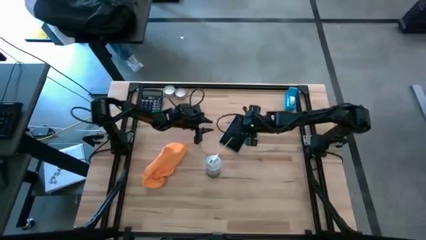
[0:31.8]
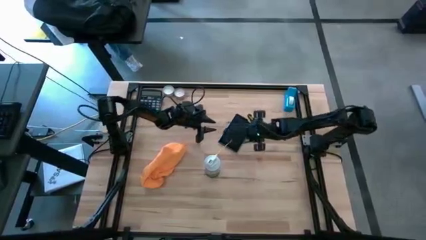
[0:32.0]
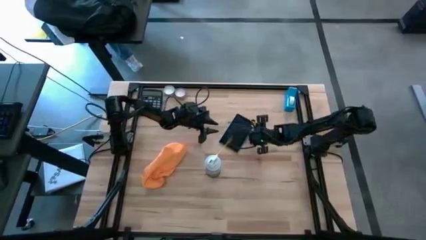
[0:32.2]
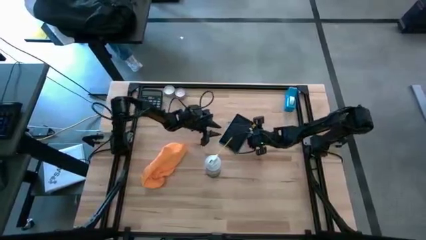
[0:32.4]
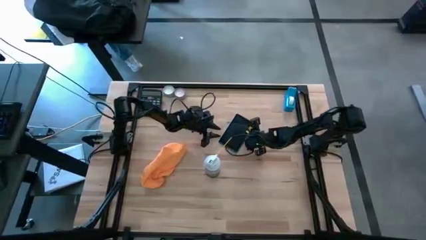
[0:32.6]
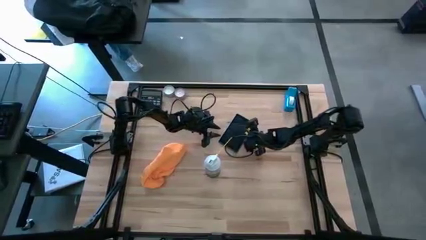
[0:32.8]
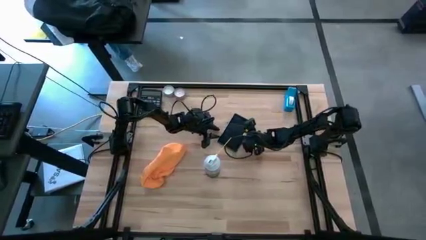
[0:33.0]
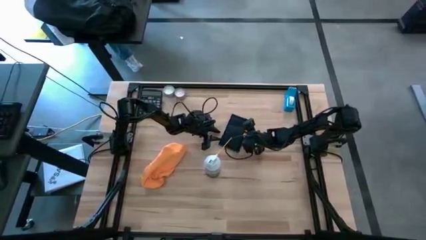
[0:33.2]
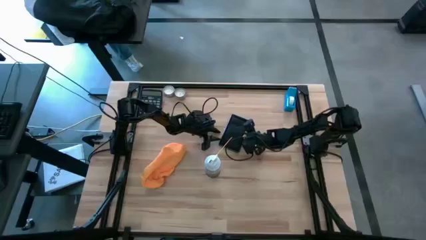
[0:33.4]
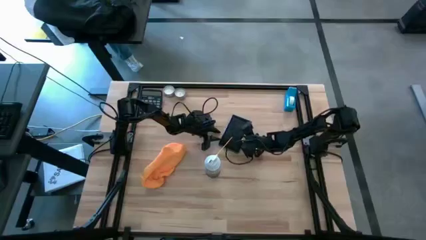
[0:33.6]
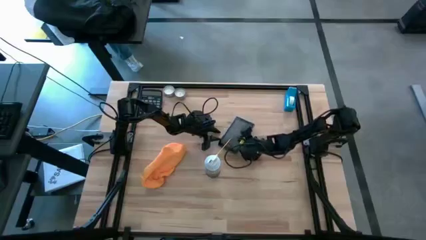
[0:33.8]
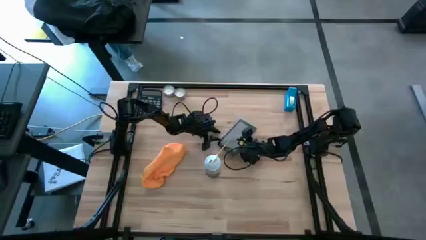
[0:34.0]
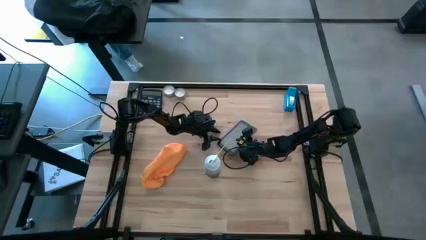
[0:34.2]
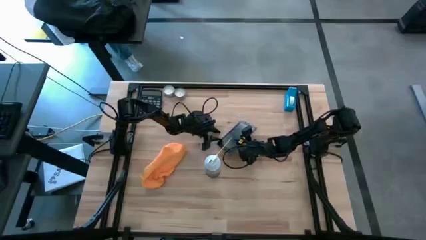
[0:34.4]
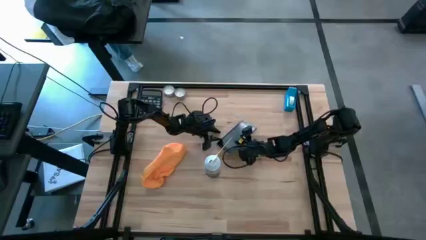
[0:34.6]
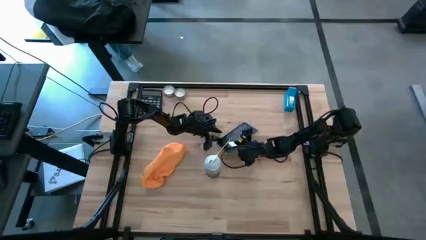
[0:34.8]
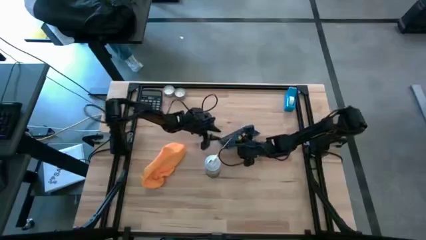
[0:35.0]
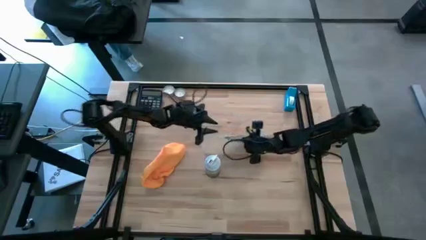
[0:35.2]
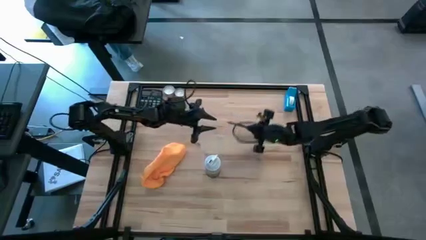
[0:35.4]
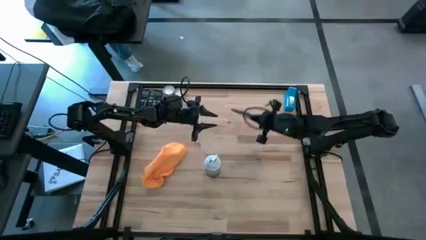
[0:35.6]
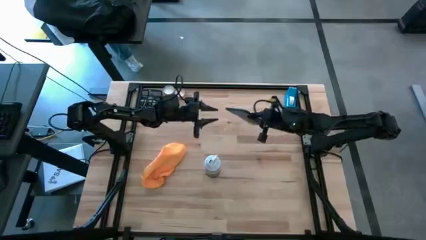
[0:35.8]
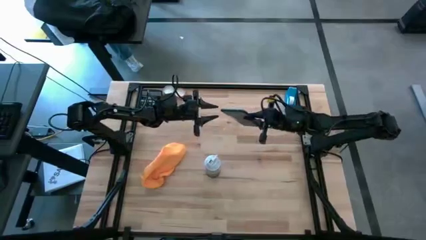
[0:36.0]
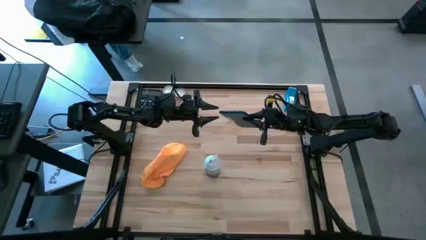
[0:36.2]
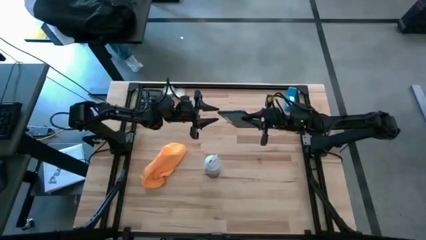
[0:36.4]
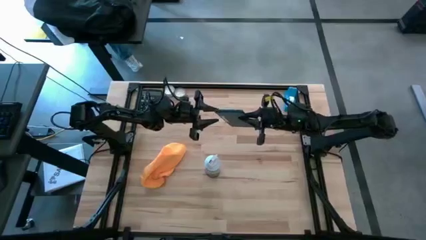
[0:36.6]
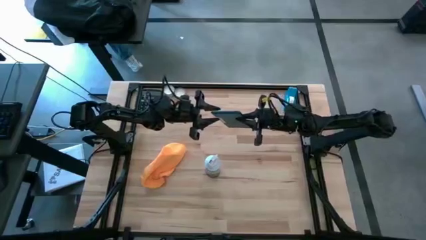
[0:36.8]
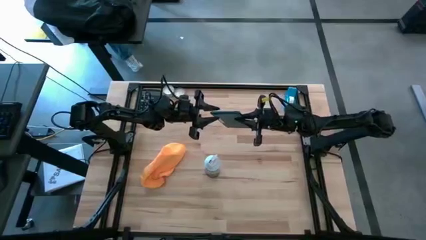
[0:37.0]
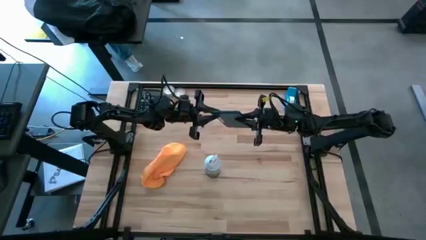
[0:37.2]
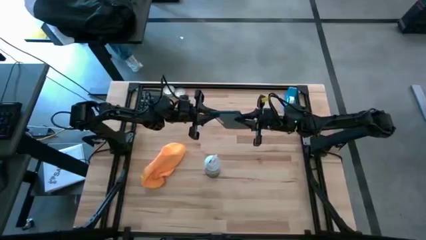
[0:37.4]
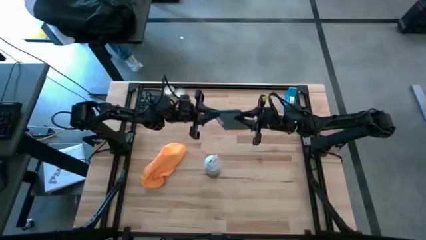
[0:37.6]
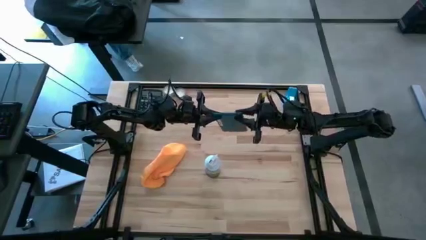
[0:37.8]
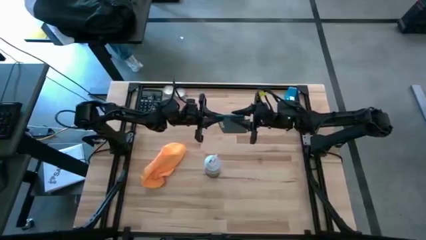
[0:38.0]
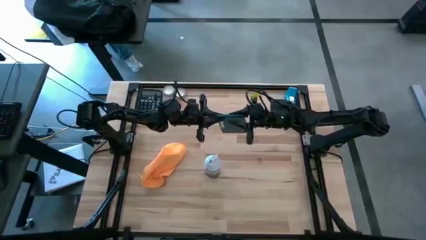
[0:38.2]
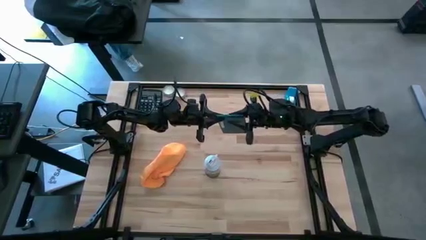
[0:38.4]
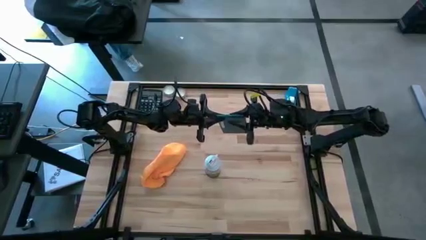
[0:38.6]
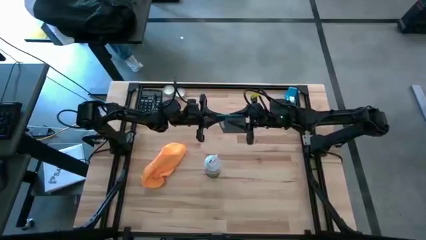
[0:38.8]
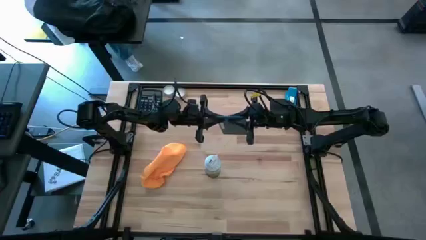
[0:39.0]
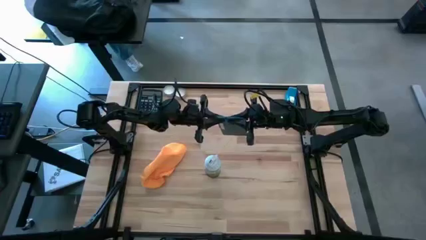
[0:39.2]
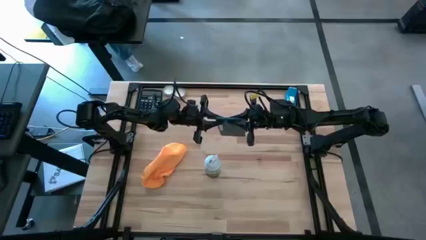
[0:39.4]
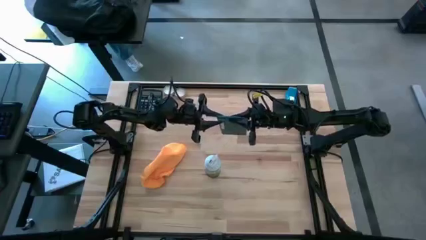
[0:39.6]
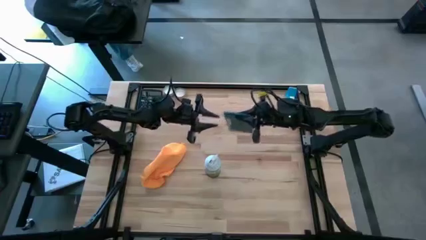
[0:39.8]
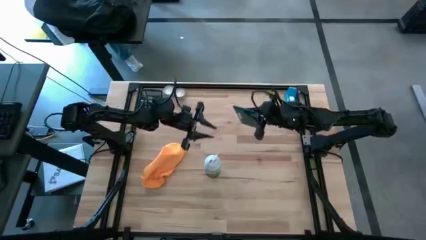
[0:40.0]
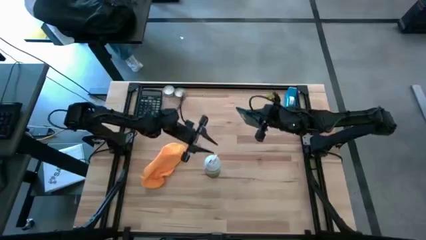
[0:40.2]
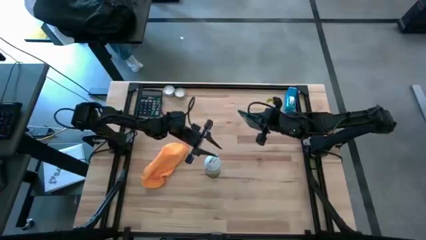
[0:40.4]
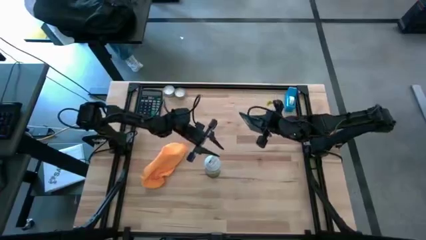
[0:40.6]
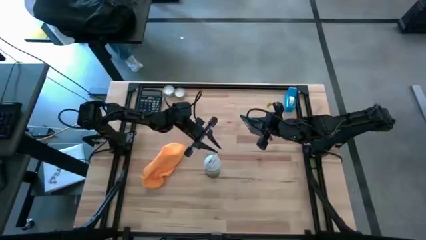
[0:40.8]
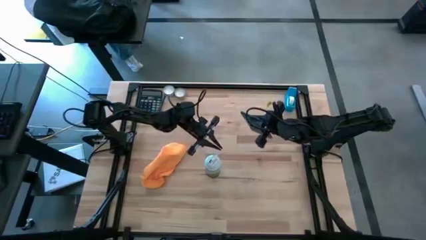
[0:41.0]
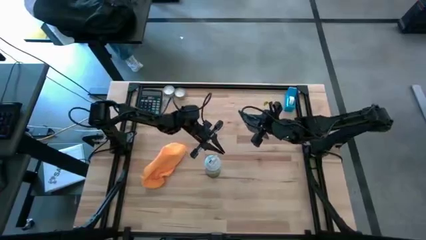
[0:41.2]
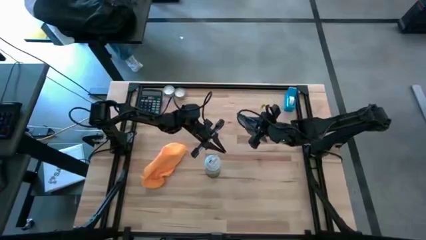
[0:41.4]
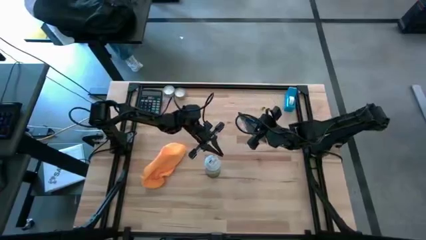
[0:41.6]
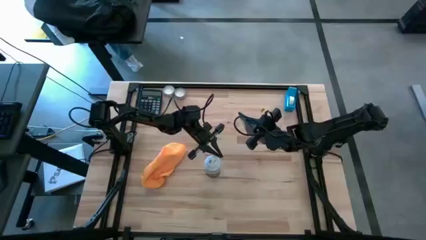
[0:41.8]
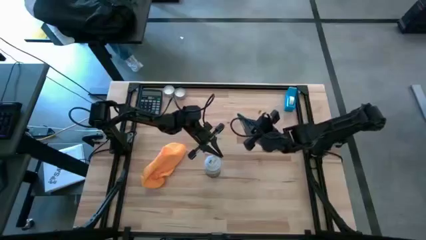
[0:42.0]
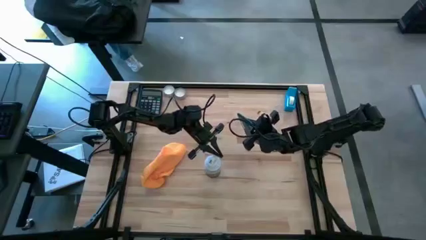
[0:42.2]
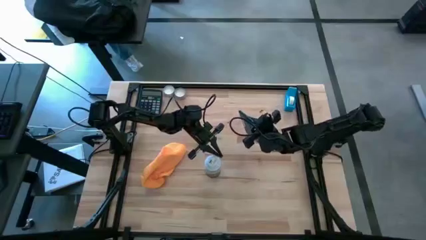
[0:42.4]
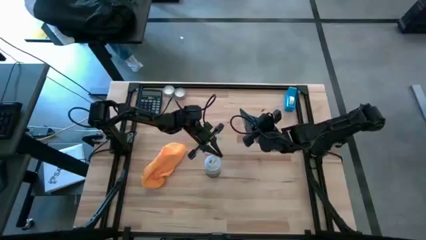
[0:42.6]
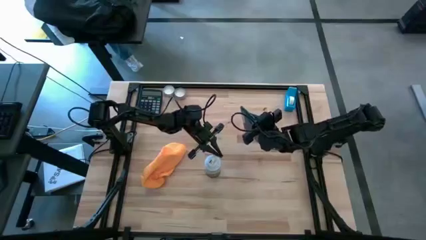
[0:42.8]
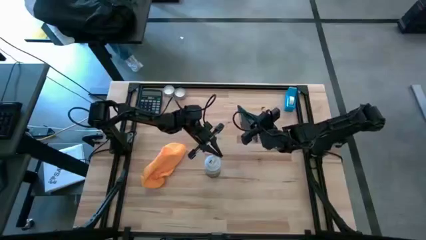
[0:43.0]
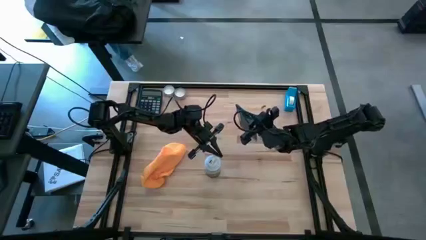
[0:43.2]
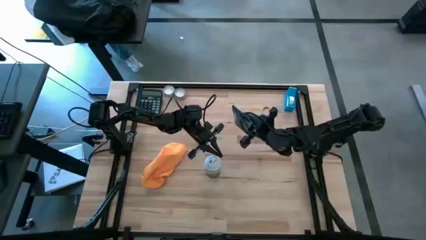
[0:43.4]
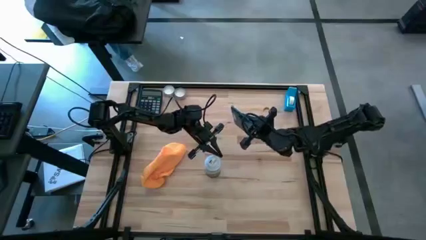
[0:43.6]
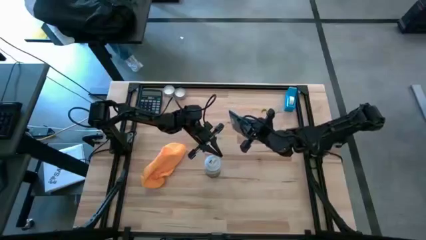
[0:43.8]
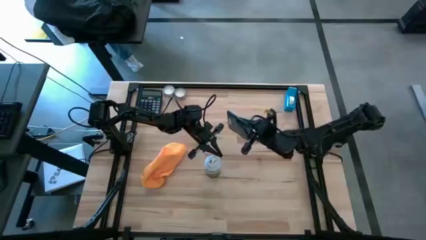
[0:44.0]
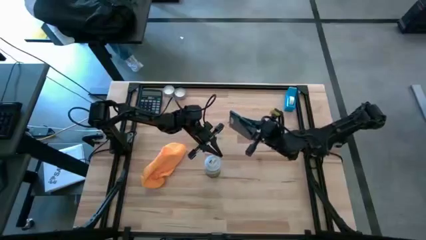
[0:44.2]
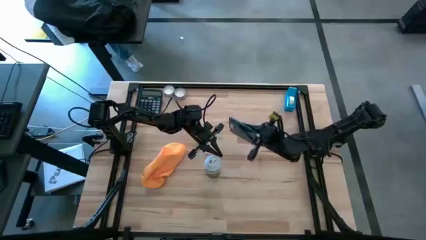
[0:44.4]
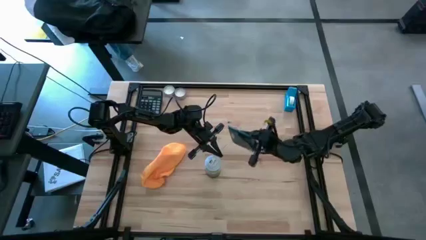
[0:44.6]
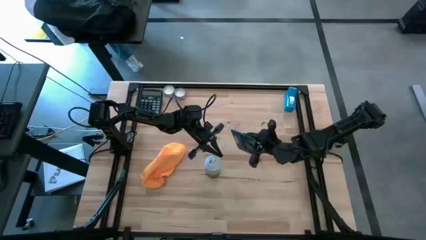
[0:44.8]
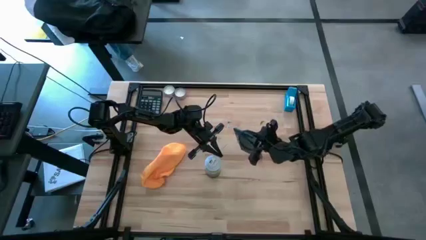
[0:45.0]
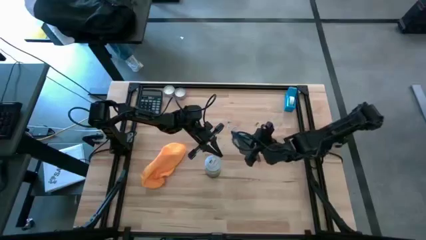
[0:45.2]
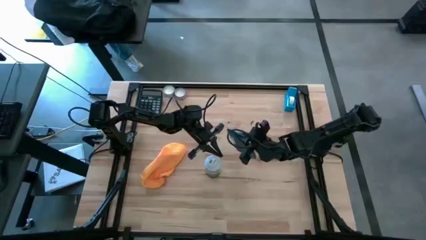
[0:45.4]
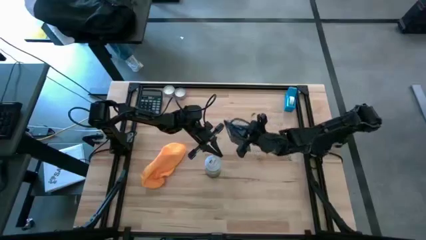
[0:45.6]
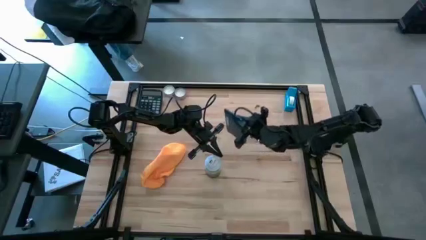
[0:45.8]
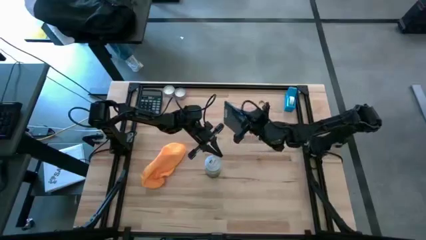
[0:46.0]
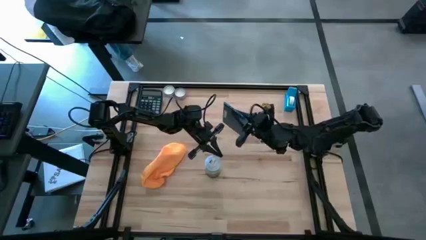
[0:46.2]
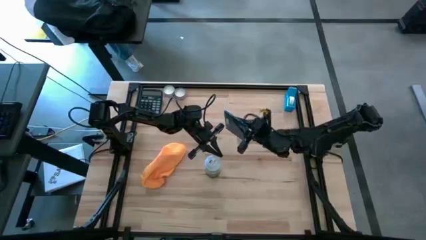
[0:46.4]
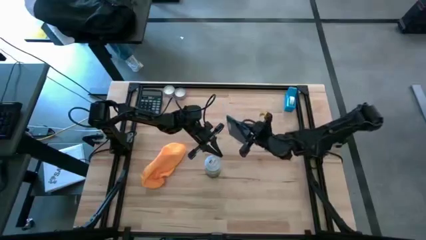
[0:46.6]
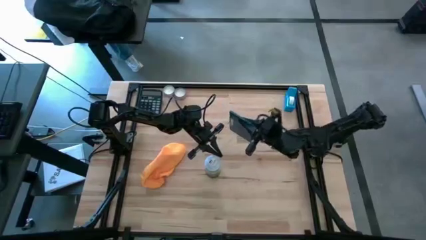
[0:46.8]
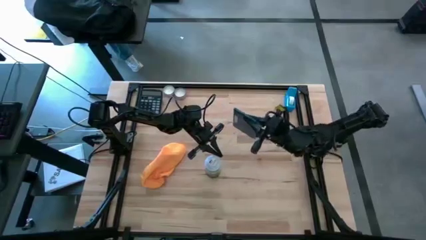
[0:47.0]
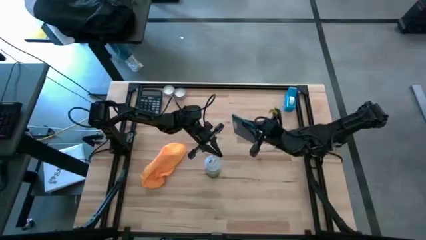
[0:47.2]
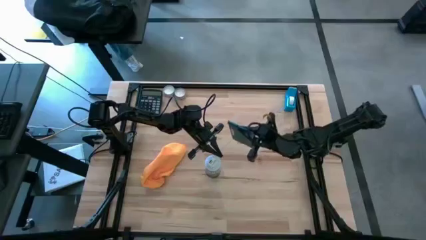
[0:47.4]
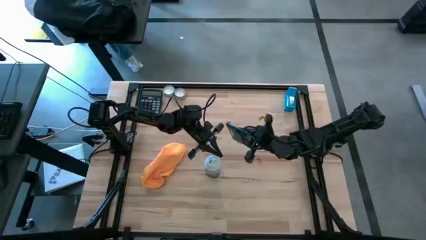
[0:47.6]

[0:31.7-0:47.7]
Task: Apply microfiber cloth
Spray the back of the blue tablet using the white spray bottle
